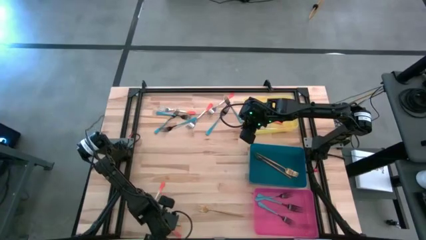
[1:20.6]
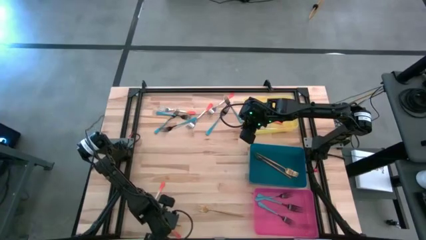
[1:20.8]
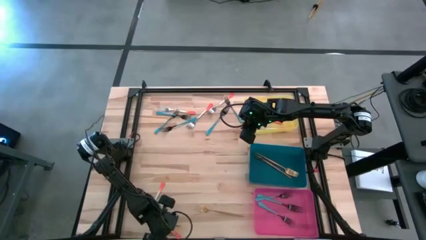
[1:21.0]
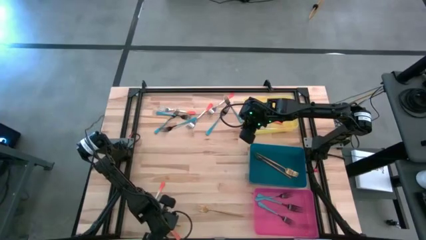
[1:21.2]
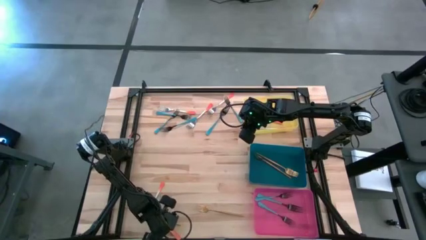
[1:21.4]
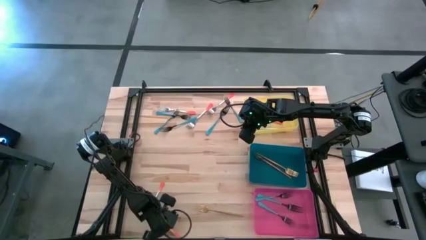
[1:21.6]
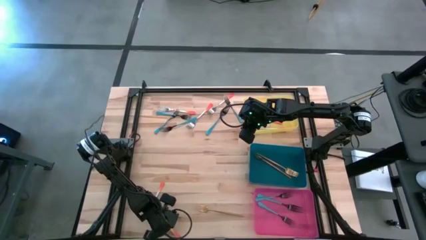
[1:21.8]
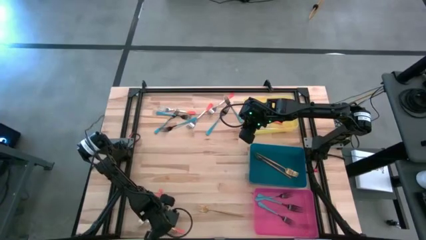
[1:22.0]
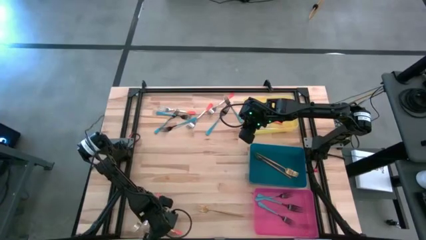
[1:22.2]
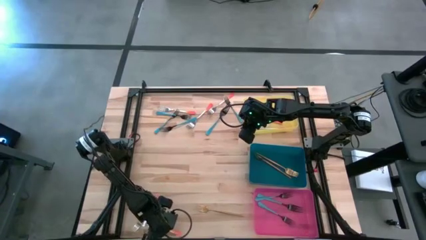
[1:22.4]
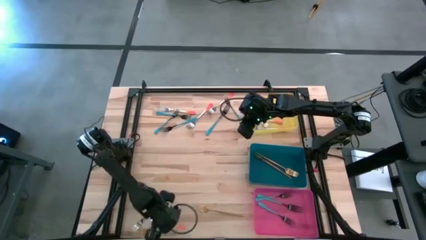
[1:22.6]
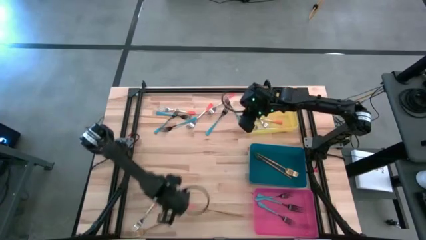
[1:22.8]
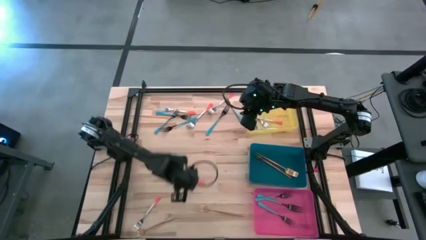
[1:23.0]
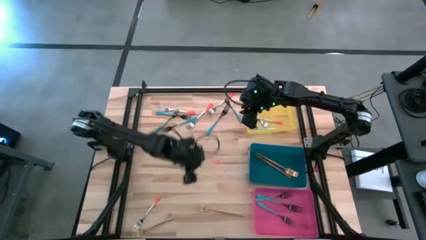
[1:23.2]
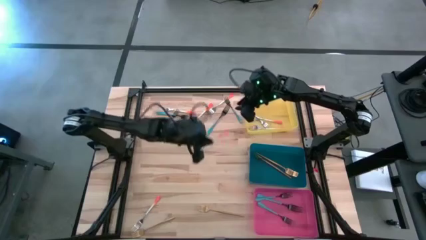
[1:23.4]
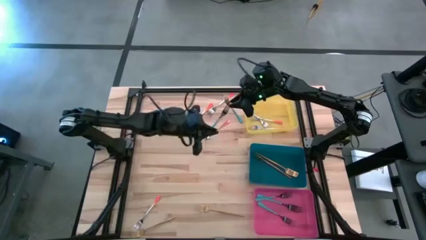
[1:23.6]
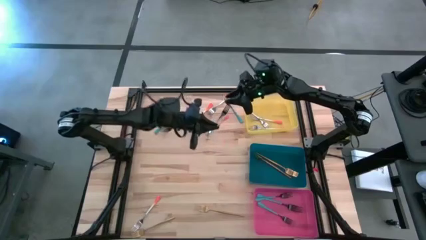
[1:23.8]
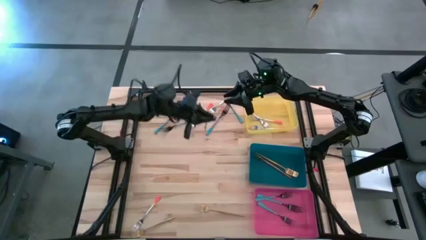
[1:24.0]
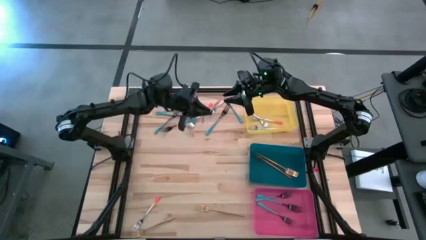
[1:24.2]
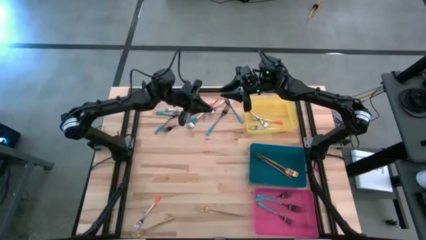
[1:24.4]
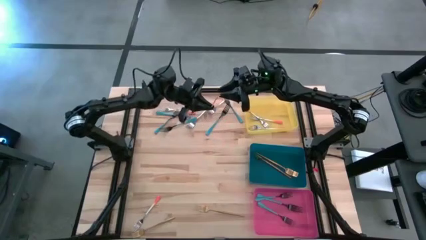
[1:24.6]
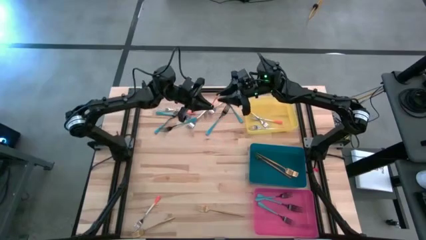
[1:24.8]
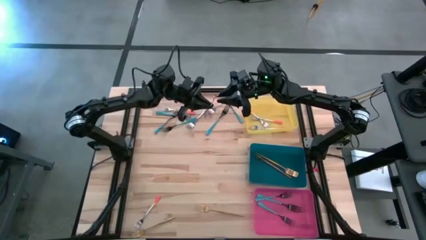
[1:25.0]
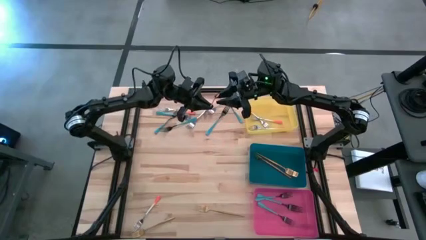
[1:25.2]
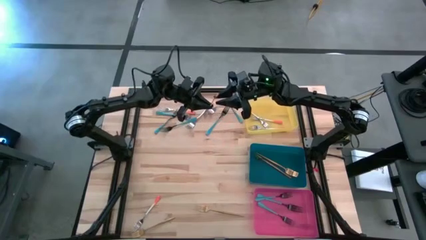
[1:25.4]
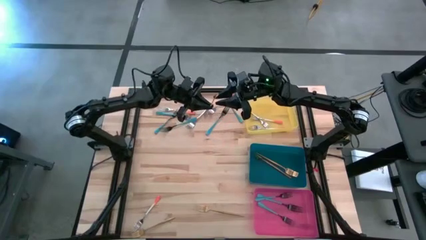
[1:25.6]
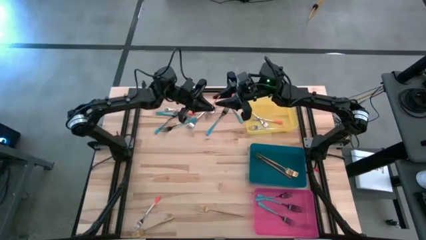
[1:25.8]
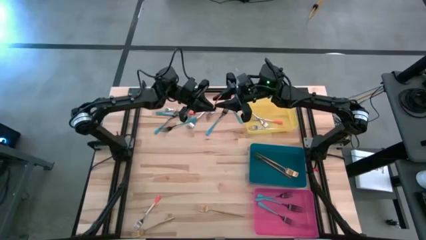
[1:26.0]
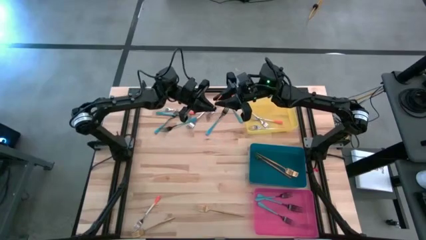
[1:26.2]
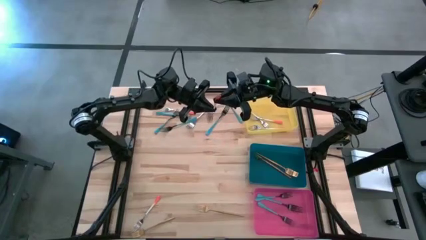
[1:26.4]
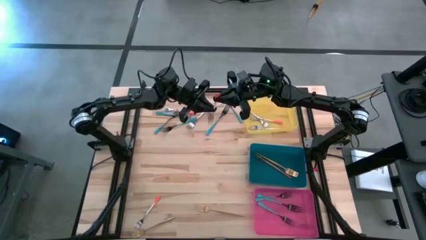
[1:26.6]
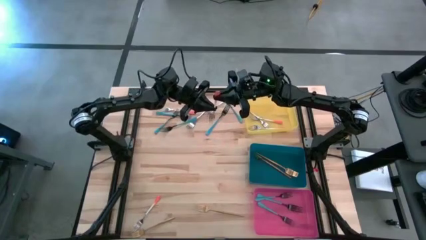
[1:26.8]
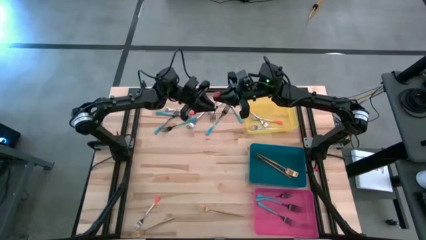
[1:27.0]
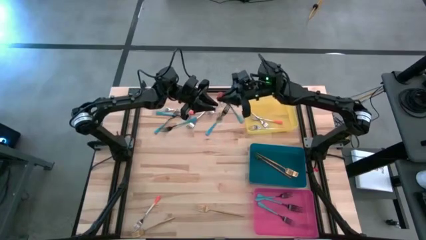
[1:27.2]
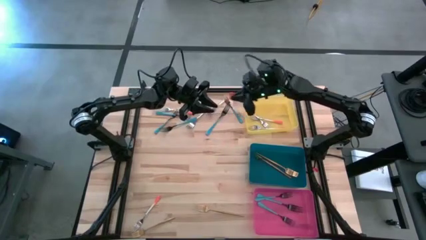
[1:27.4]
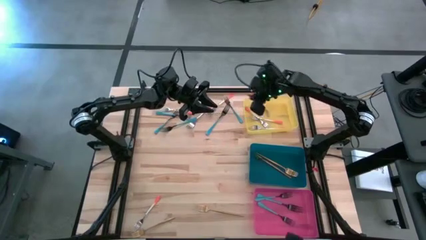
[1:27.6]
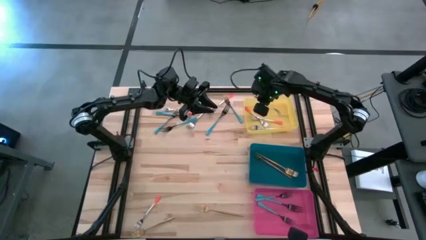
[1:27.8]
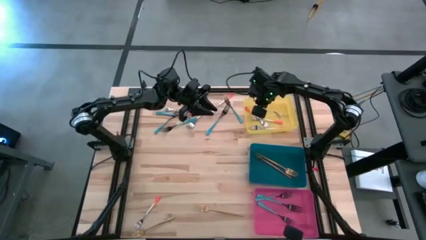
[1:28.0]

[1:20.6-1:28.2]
Task: Sort silverware by color (type)
Put the orange fork into the yellow bin

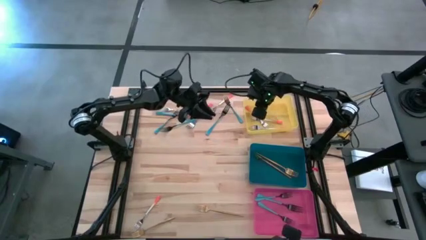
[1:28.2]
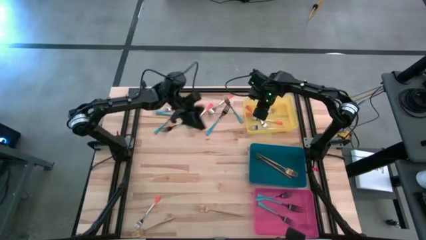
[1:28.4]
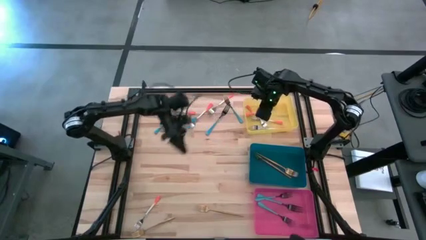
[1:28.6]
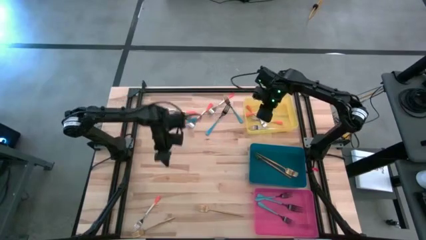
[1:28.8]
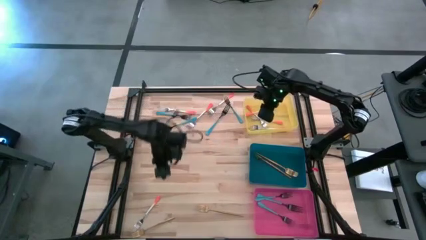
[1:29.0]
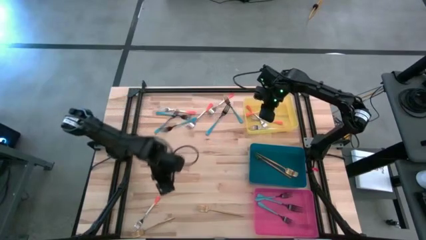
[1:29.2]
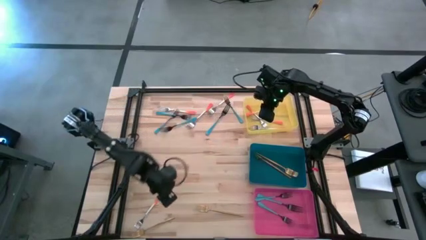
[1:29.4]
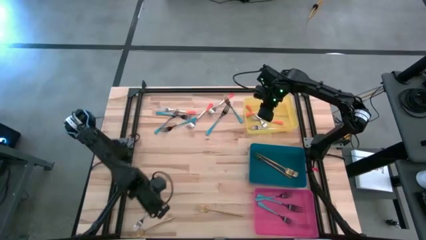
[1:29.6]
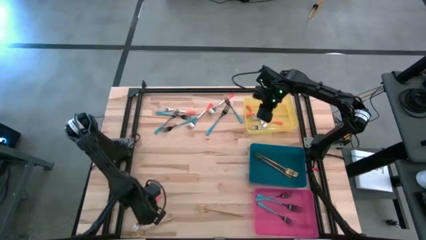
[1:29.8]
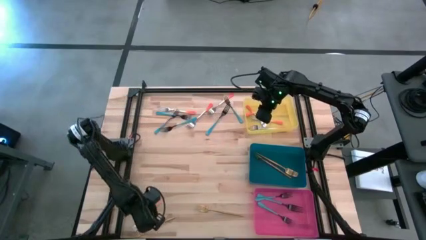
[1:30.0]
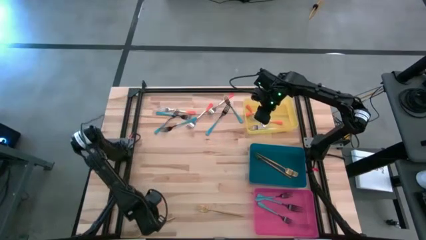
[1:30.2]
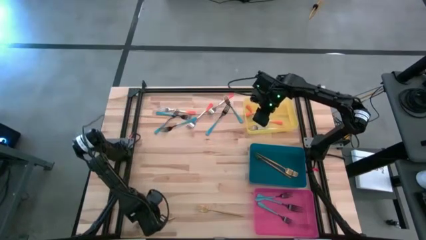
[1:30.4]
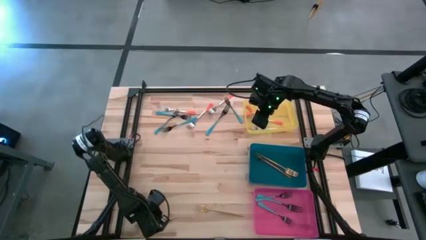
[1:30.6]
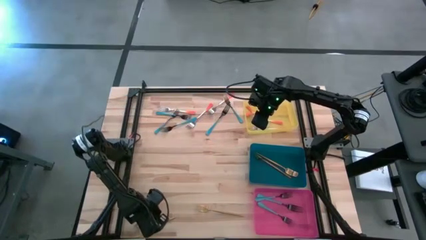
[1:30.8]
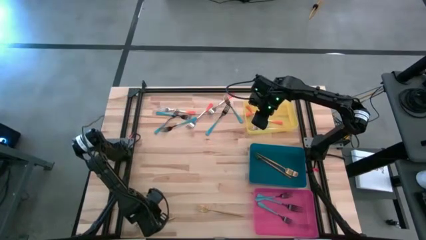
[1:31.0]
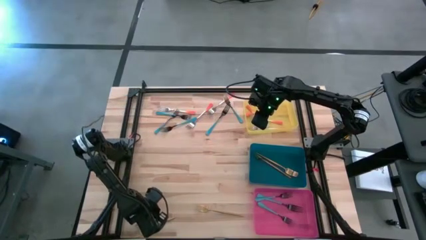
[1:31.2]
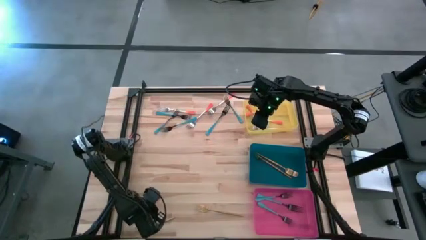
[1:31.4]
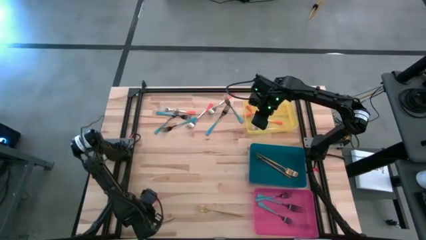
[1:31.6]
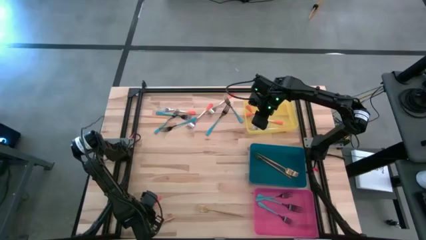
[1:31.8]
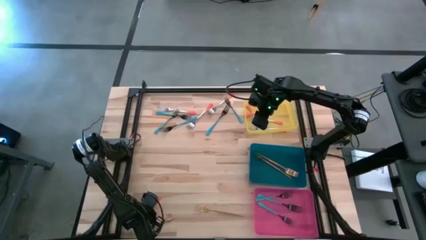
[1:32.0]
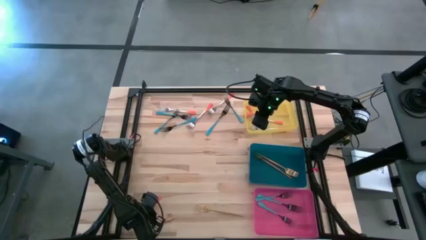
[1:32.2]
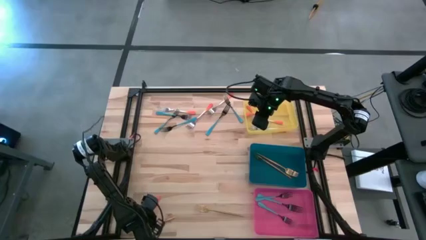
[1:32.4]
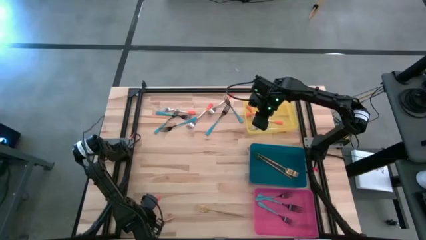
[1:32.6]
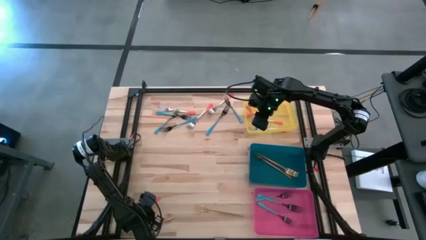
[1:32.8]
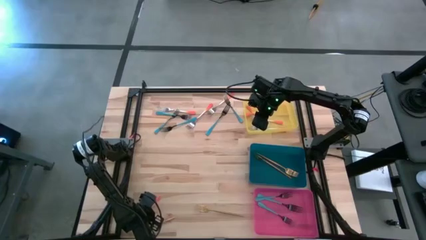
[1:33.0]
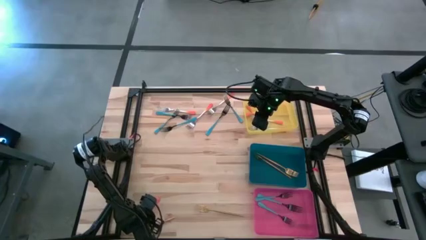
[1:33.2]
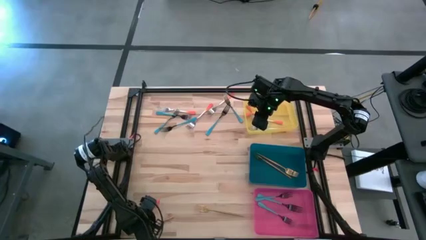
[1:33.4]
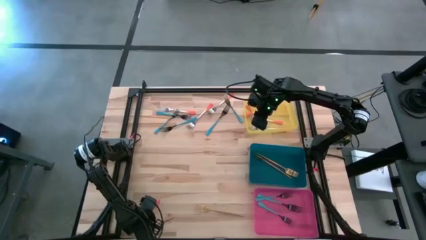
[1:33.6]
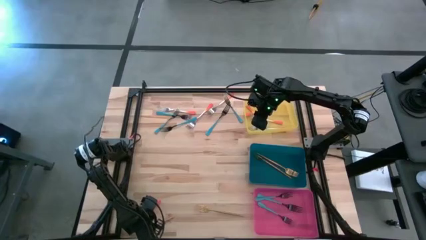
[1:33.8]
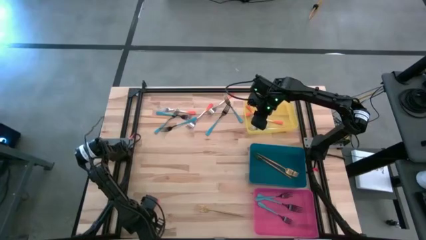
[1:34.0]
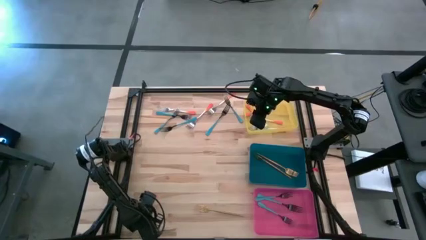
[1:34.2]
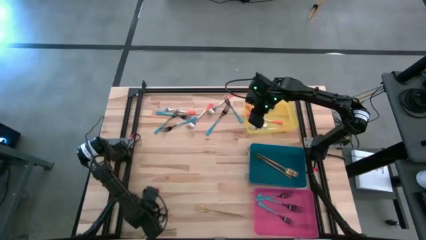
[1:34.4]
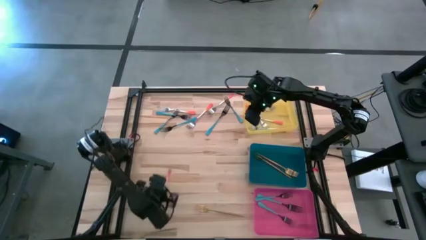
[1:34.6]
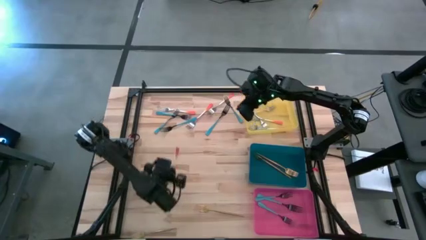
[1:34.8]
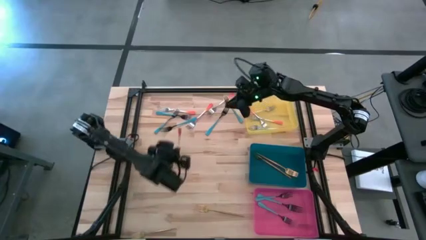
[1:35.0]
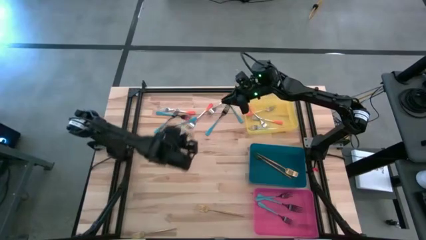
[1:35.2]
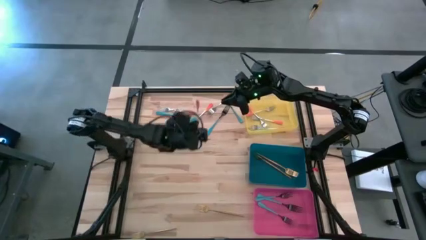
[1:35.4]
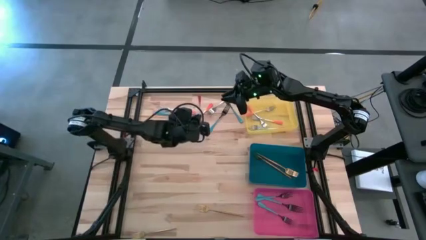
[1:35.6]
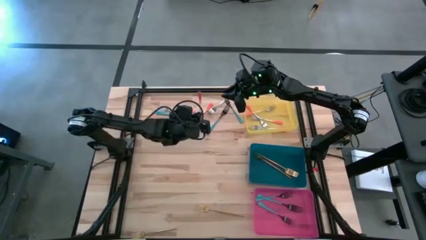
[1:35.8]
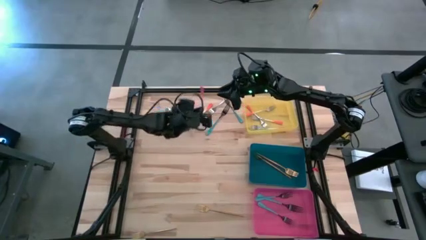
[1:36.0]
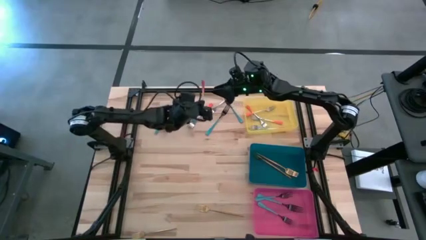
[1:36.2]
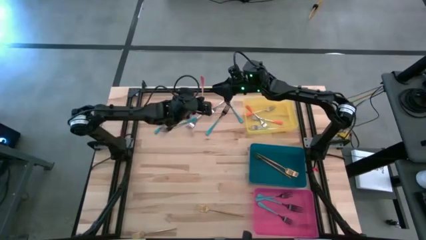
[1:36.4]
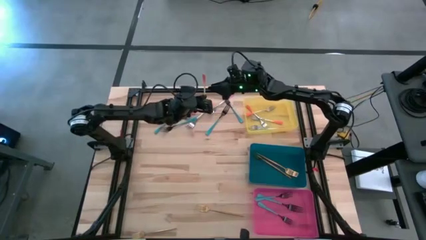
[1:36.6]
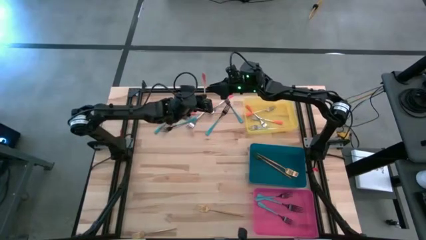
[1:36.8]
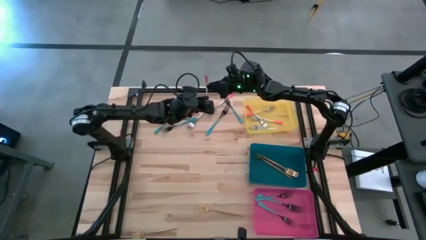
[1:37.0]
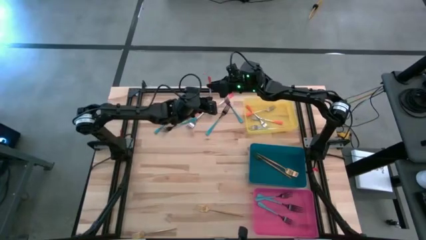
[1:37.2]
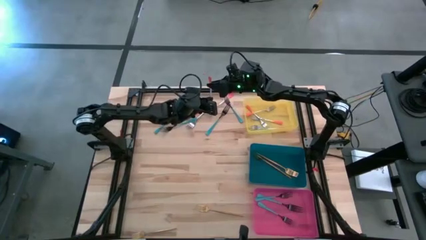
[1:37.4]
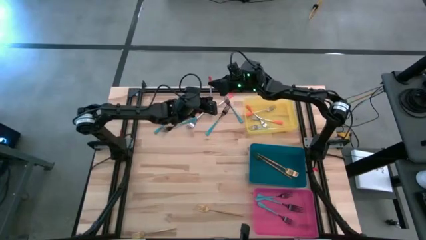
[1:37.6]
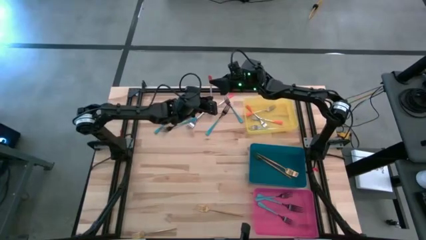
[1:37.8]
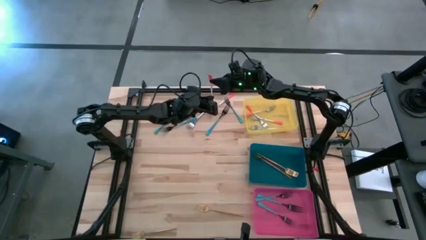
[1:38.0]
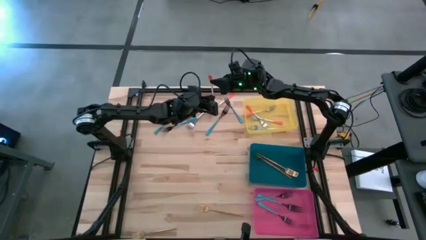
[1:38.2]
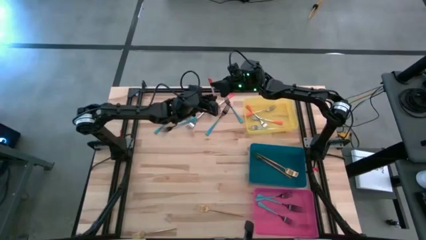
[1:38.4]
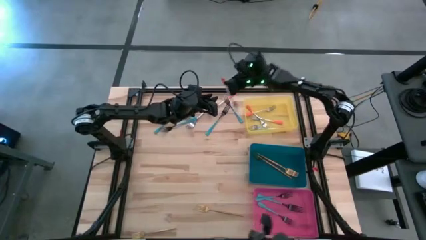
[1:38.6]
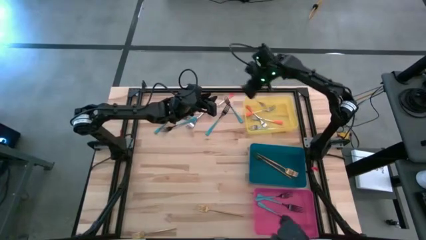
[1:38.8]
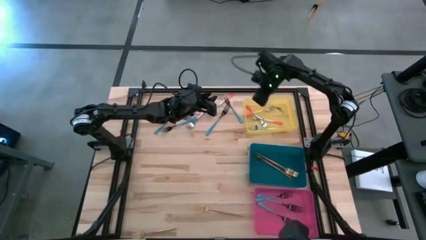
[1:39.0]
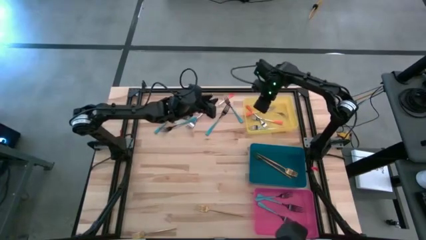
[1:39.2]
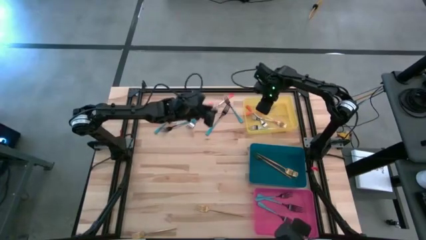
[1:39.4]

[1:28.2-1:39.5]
Put the orange fork into the yellow bin
